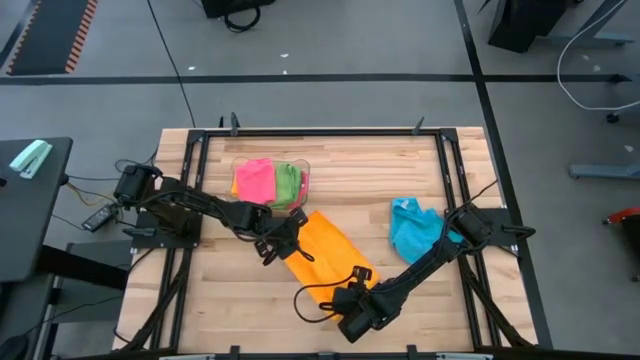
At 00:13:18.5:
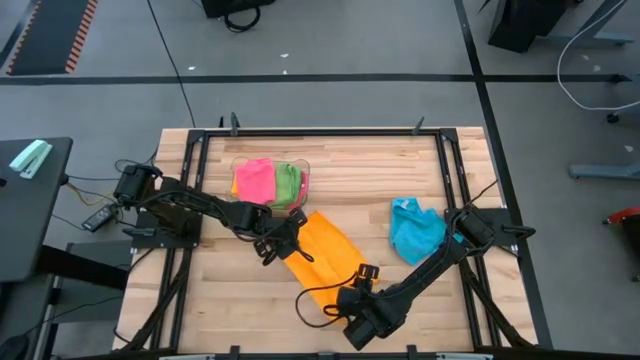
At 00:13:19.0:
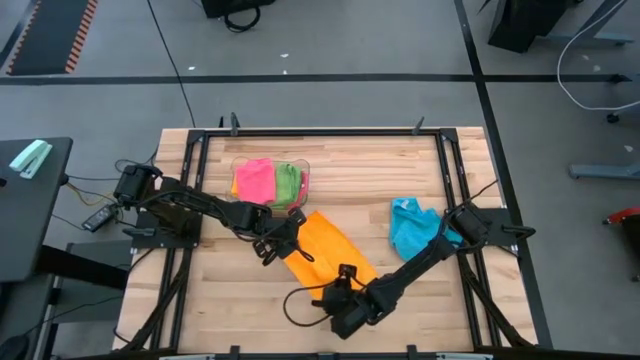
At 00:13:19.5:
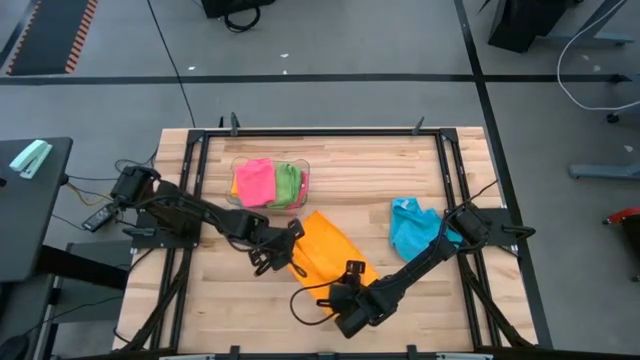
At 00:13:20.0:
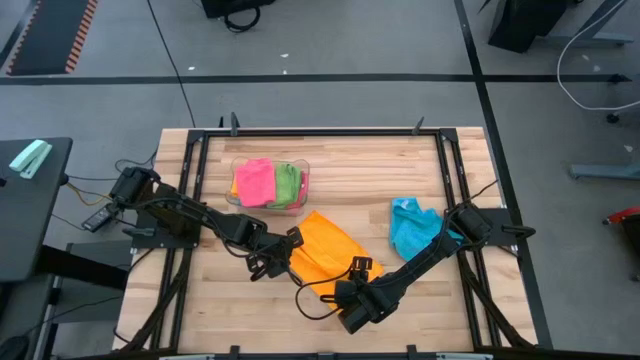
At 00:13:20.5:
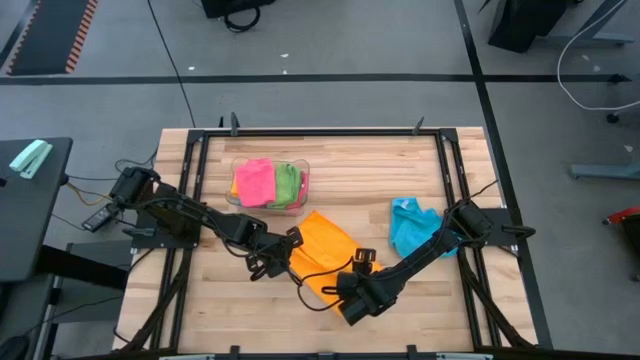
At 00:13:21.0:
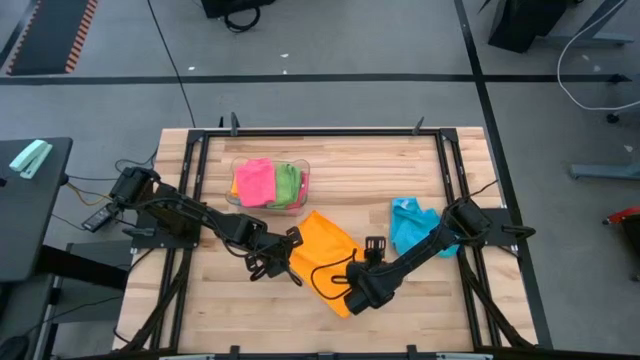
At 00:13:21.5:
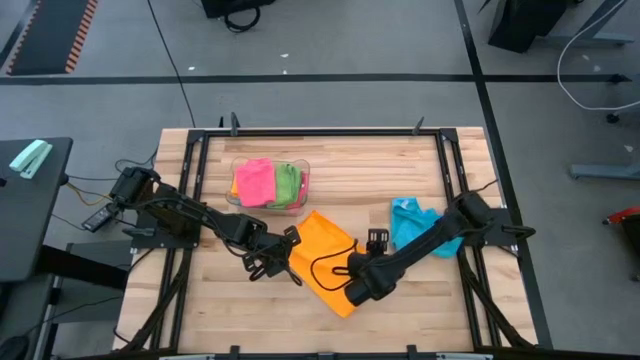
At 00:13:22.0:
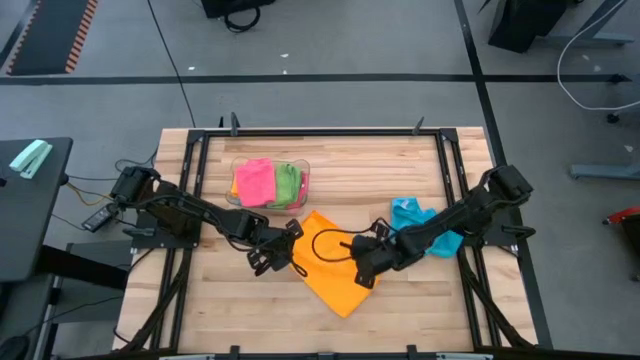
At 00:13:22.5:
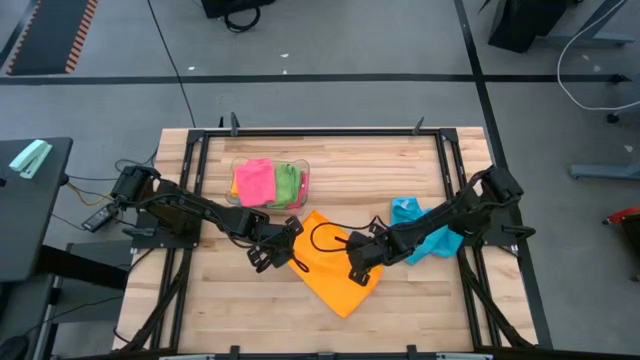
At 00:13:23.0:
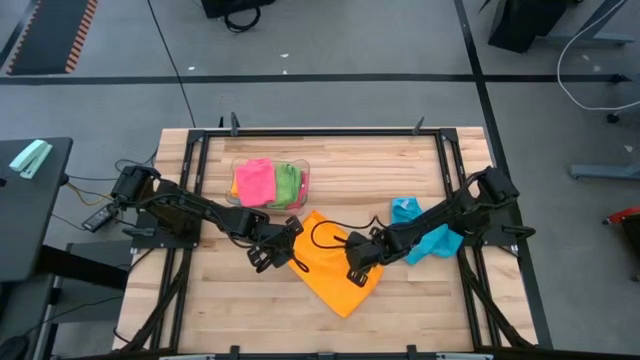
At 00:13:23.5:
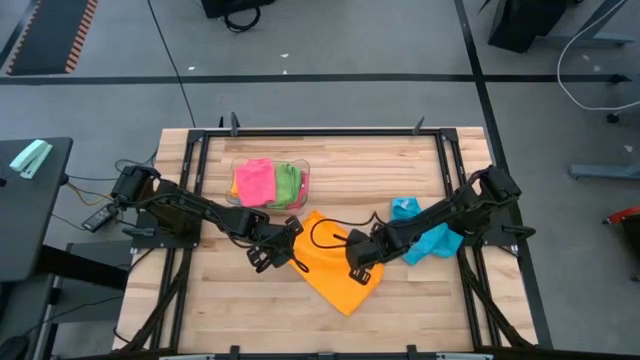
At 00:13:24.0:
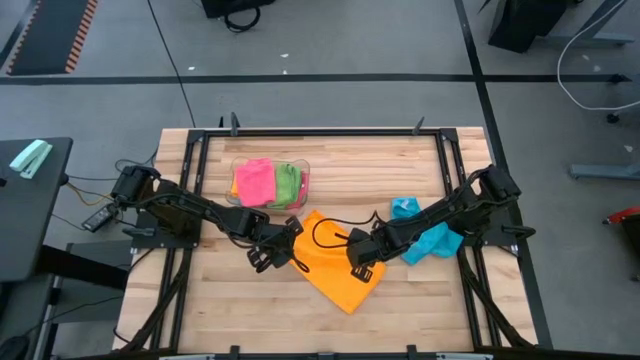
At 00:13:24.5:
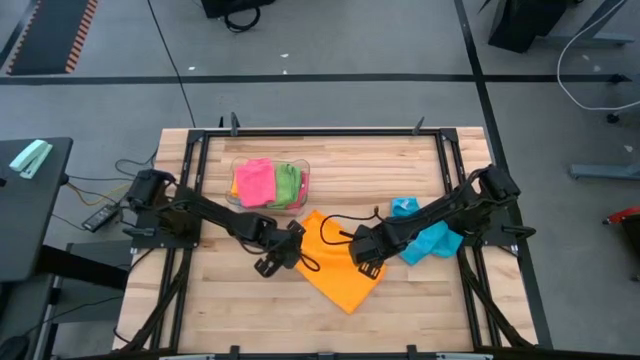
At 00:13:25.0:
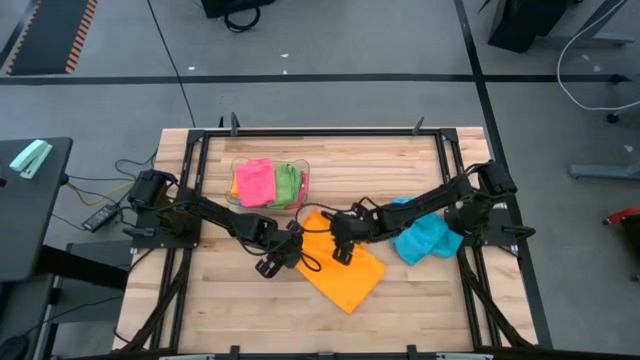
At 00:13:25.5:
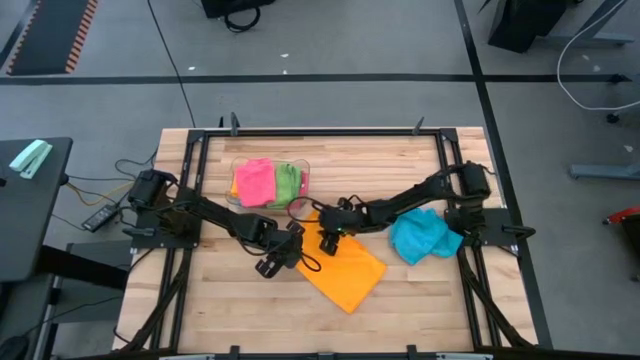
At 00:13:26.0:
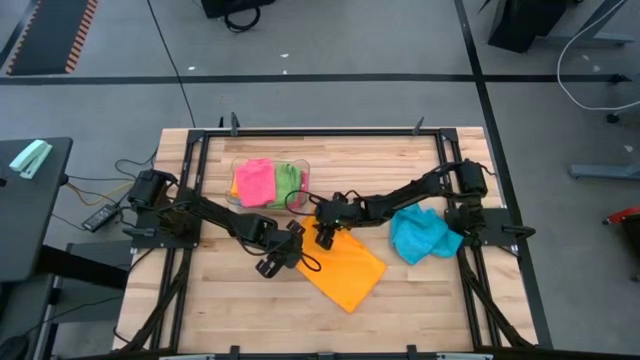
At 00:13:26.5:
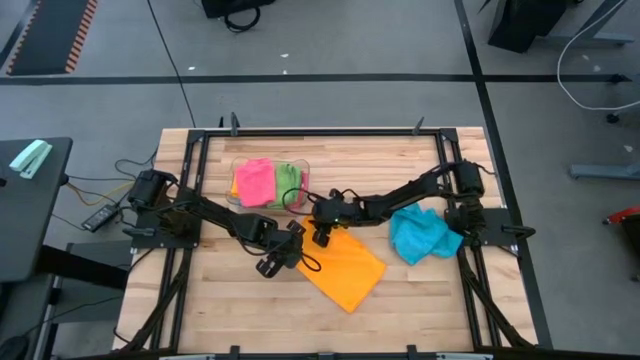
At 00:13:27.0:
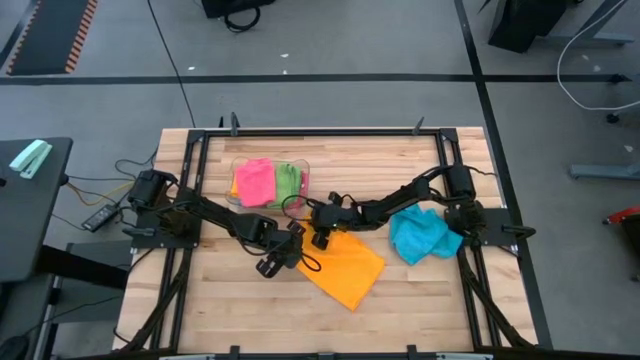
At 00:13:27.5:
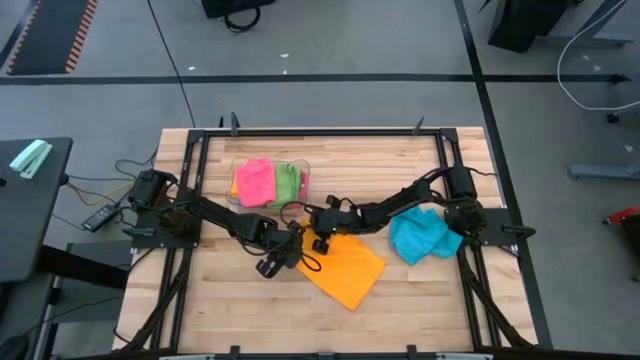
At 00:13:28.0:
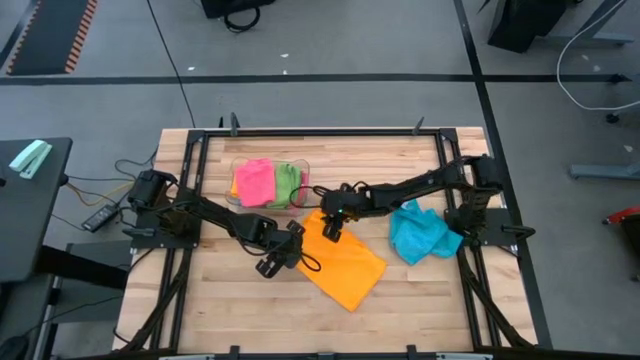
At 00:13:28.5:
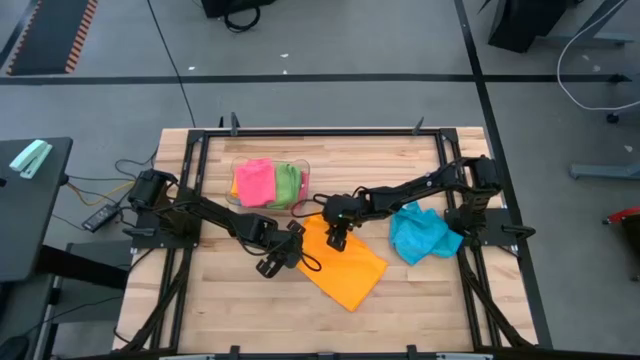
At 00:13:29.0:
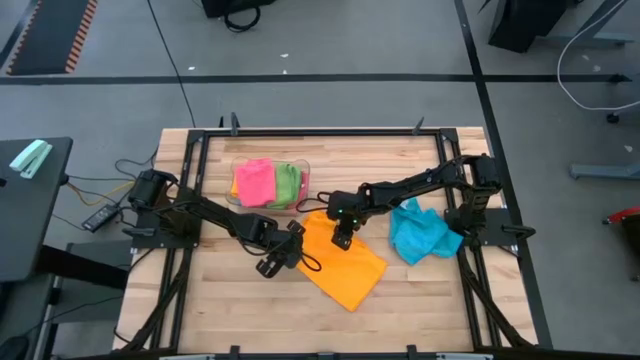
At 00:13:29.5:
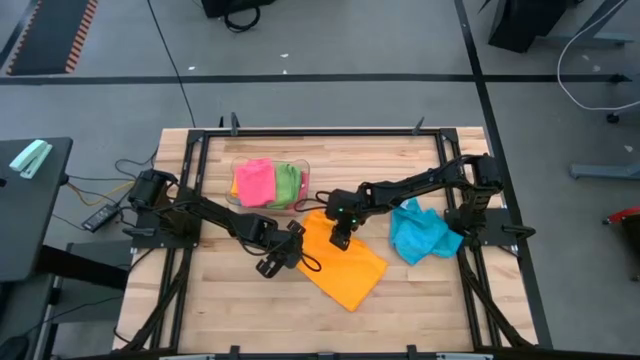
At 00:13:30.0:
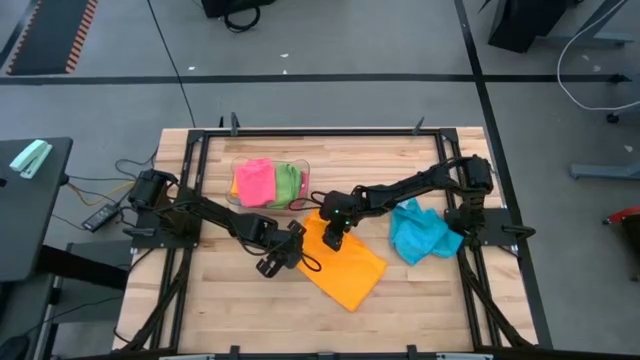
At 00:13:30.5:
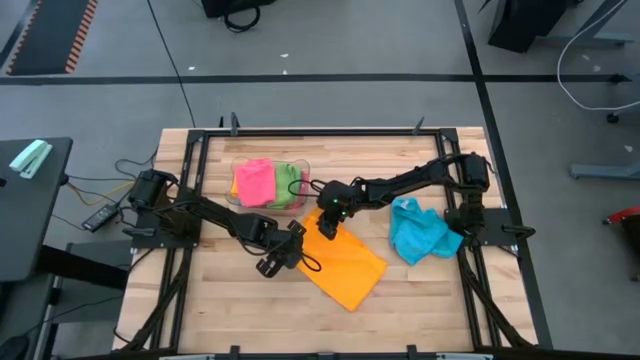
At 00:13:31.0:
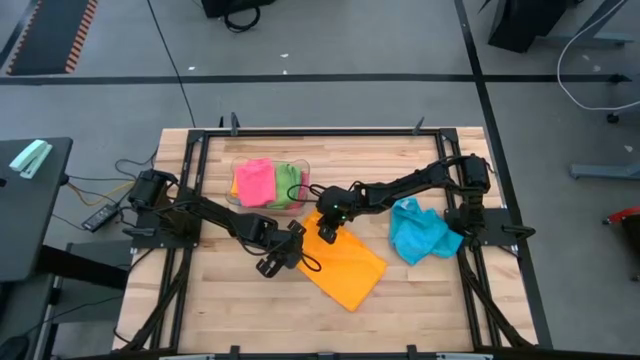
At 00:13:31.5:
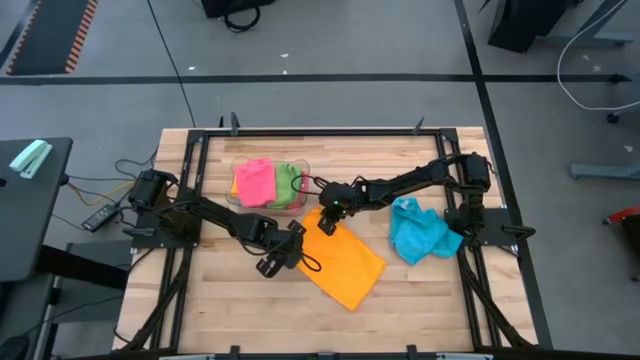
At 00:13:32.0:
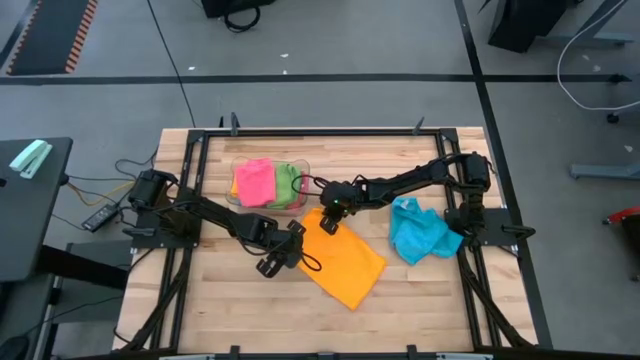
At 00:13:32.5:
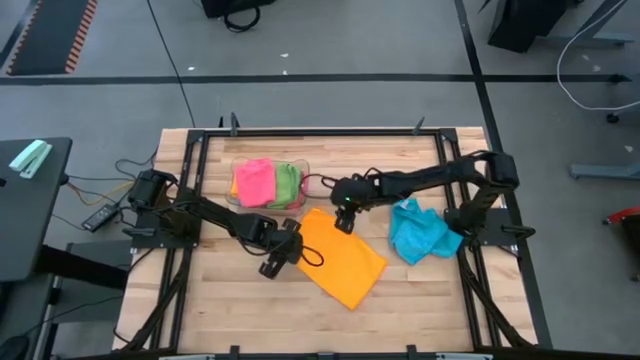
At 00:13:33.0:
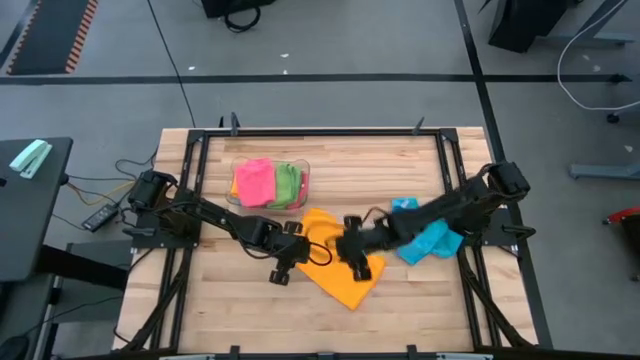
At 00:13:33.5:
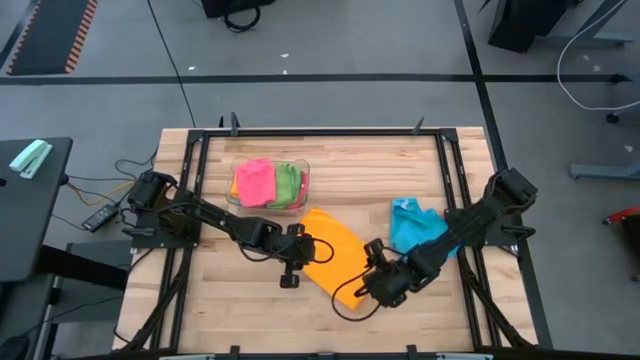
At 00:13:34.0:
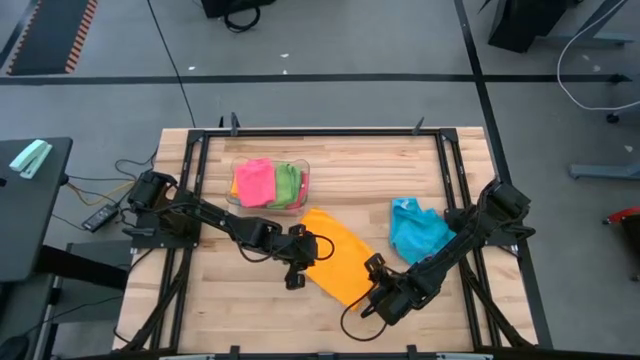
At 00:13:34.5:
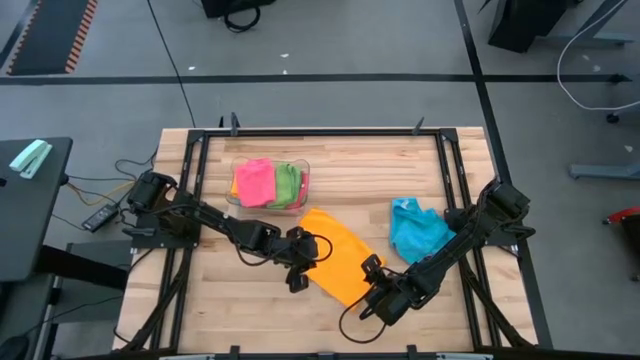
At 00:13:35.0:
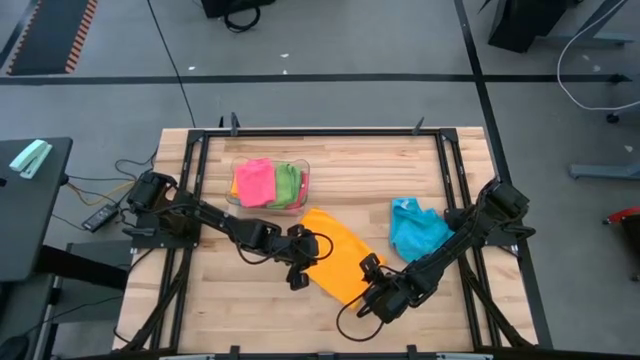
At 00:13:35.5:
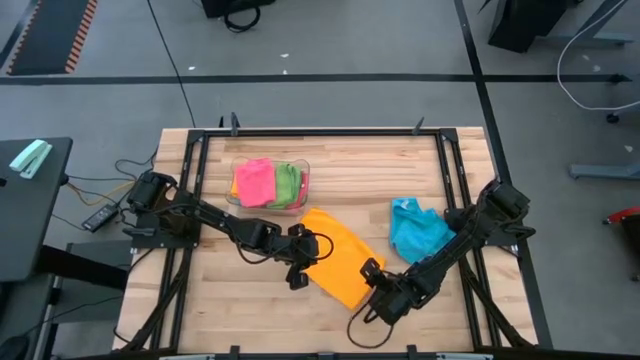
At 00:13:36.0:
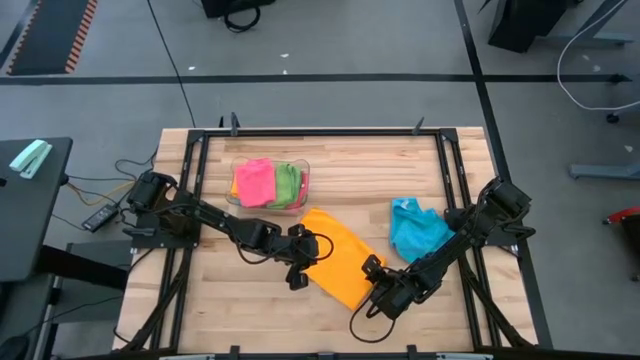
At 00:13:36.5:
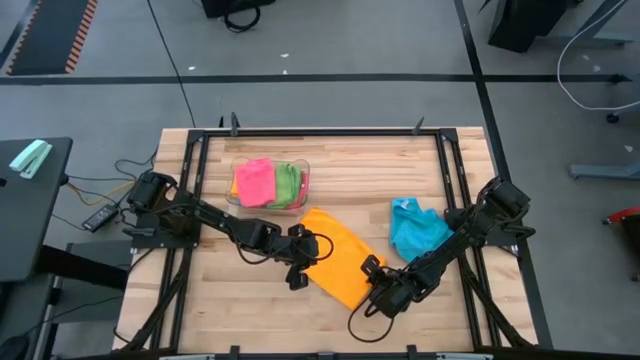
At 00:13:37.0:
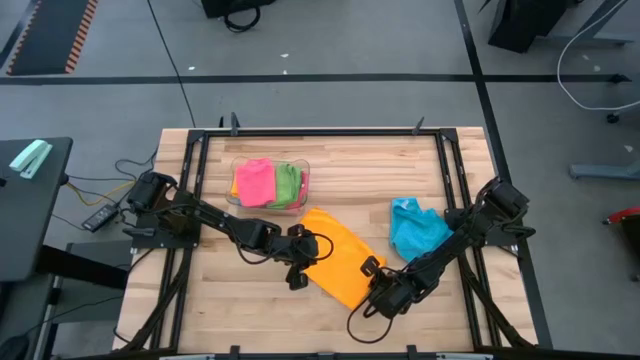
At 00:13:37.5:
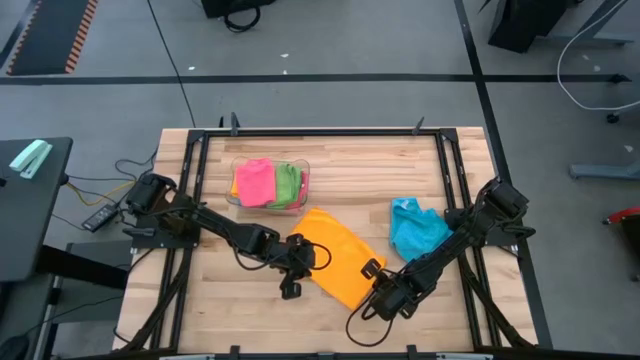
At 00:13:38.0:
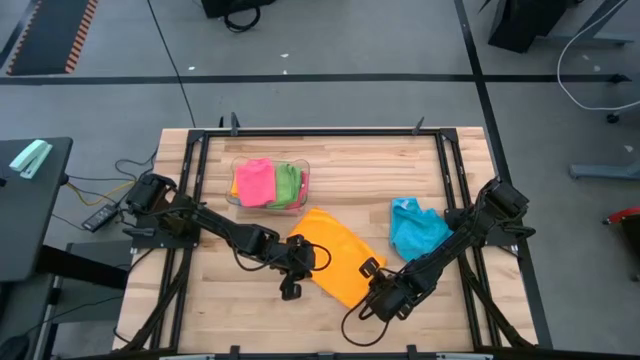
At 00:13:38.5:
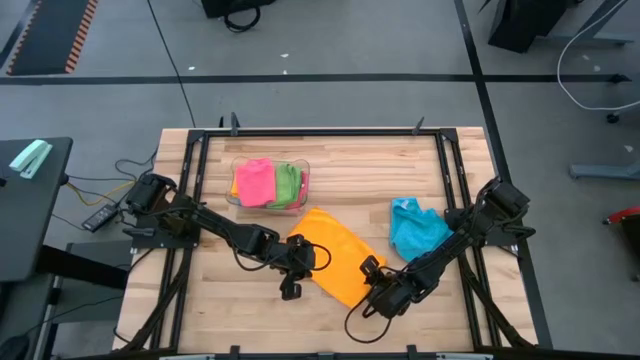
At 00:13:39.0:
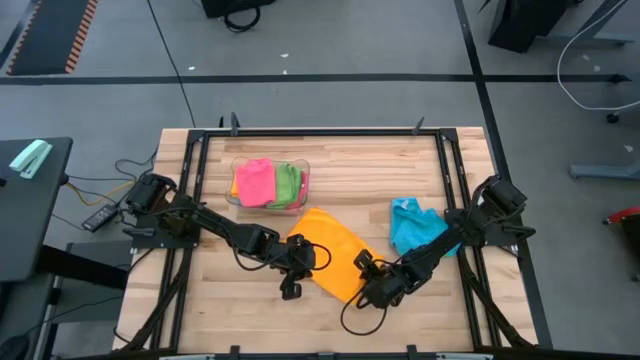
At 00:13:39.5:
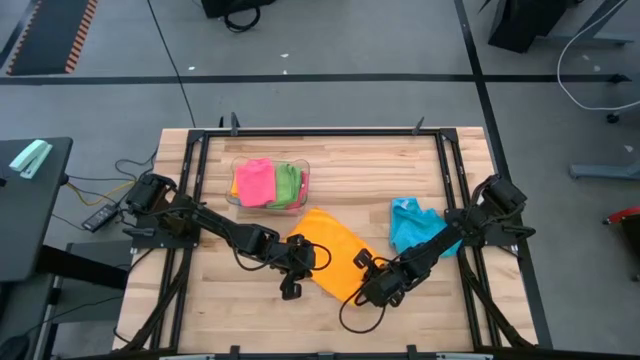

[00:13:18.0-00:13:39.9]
Task: Fold microfiber towels
Fold the orange microfiber towel
